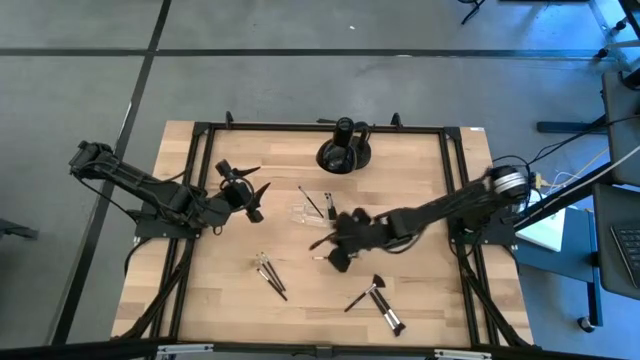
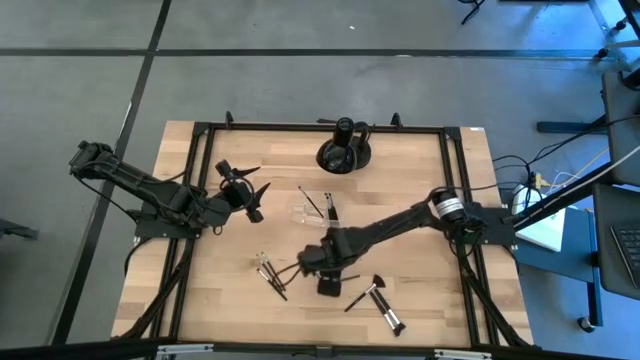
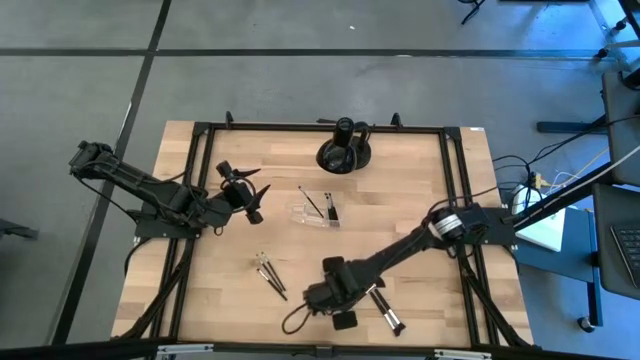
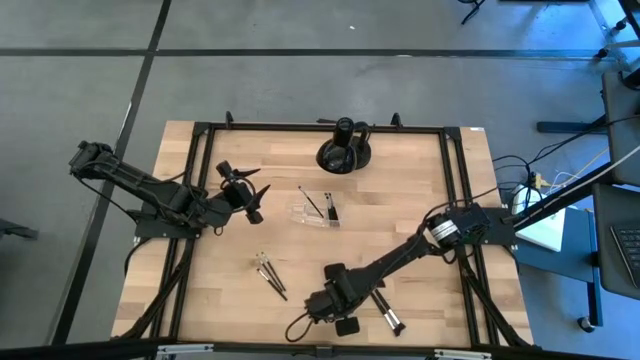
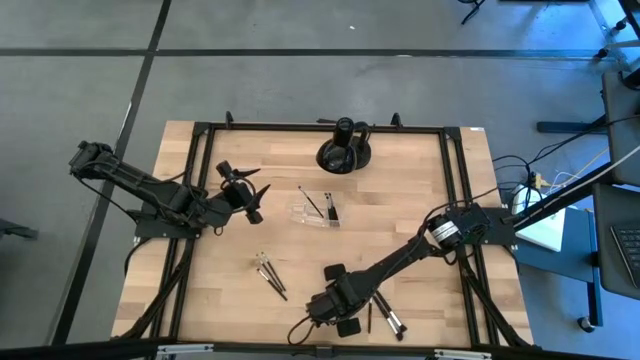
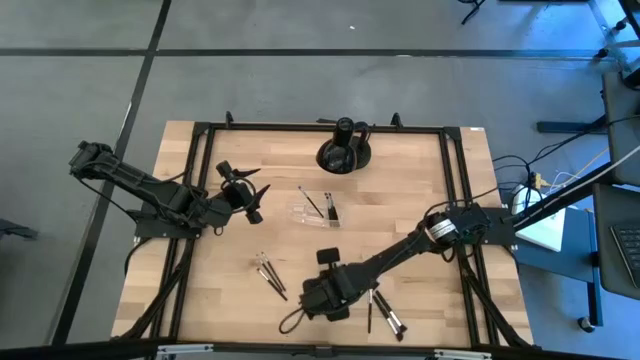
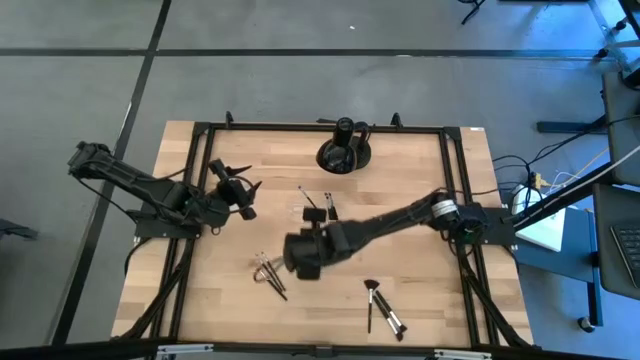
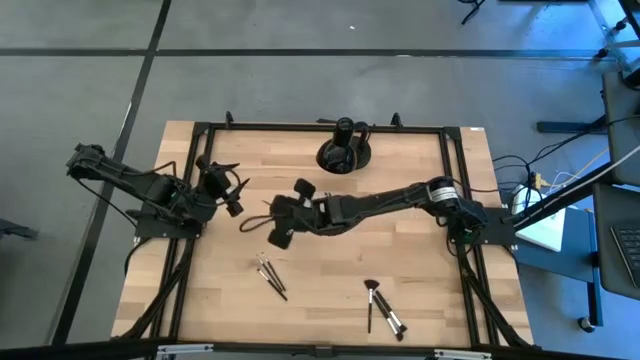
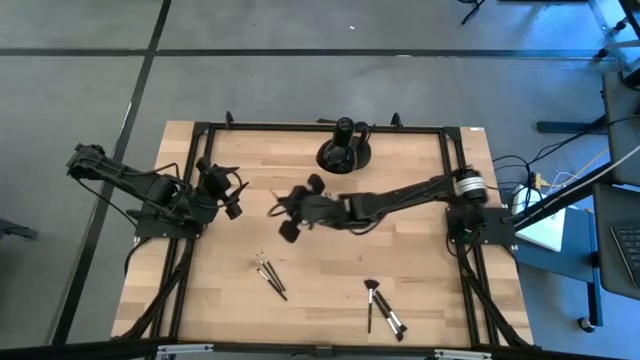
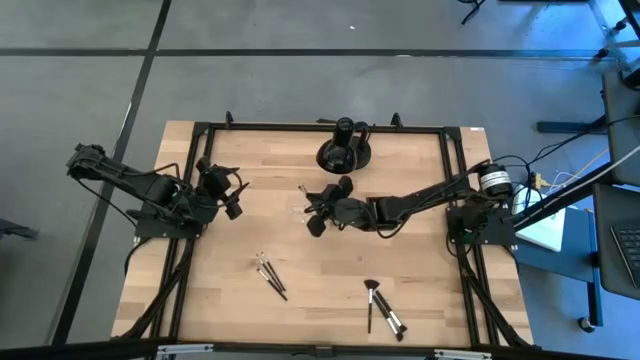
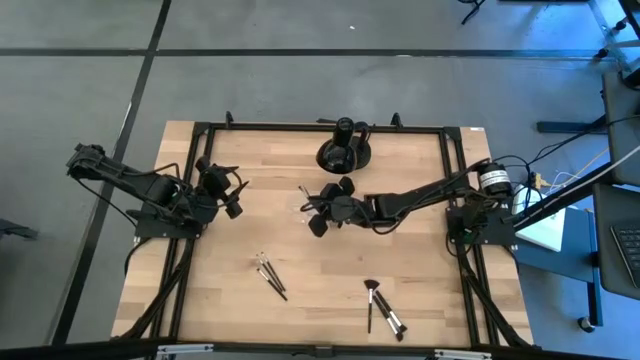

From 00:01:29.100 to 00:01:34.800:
Task: Pick & Place Makeup Supplies
Put the makeup brush into the transparent organizer

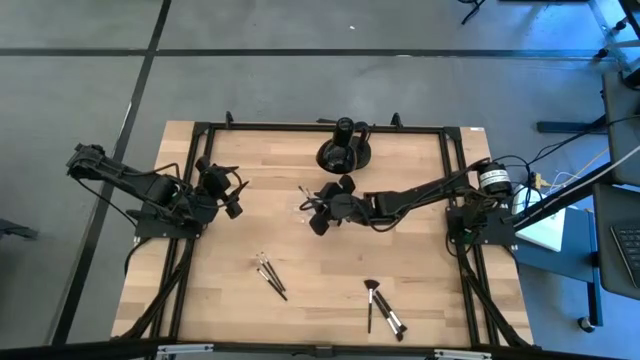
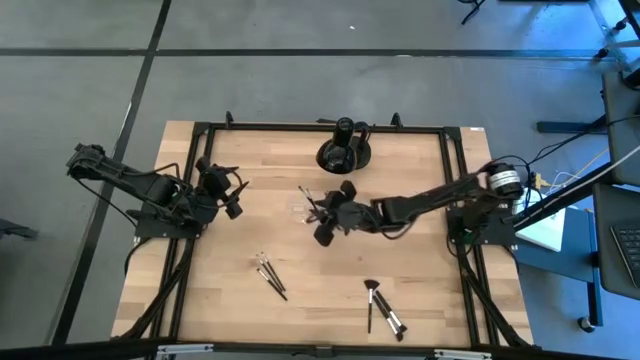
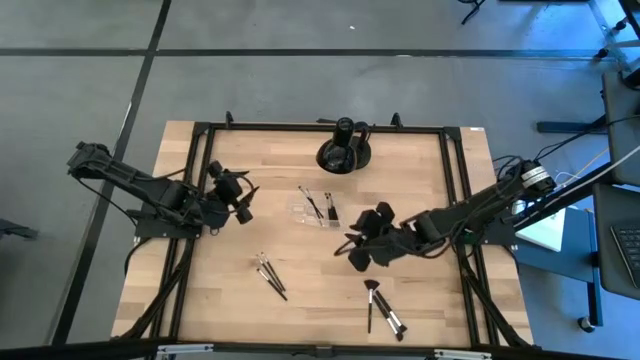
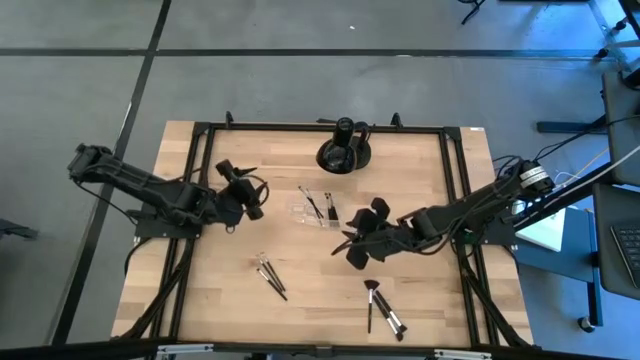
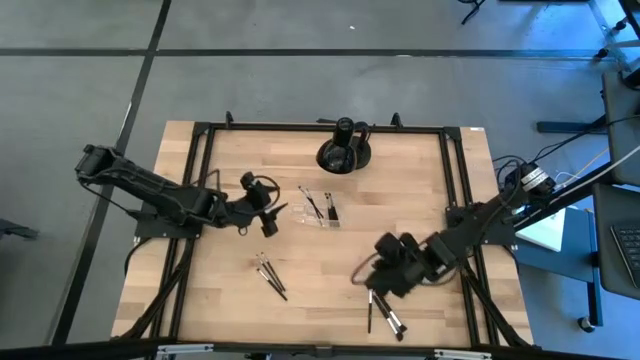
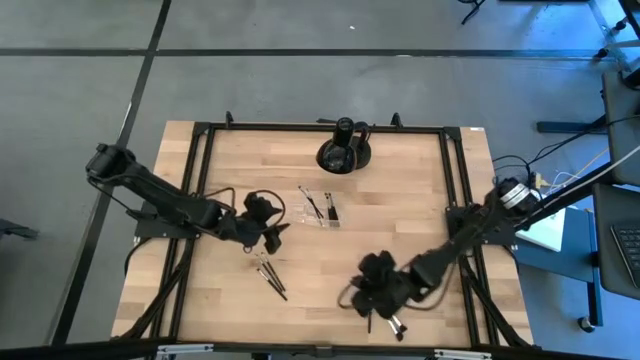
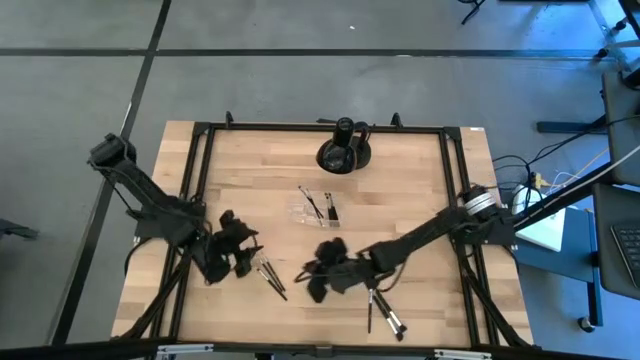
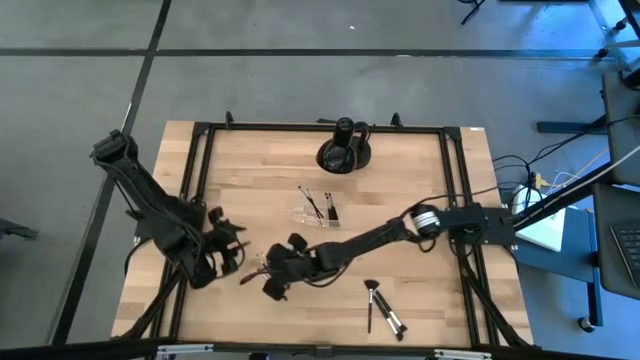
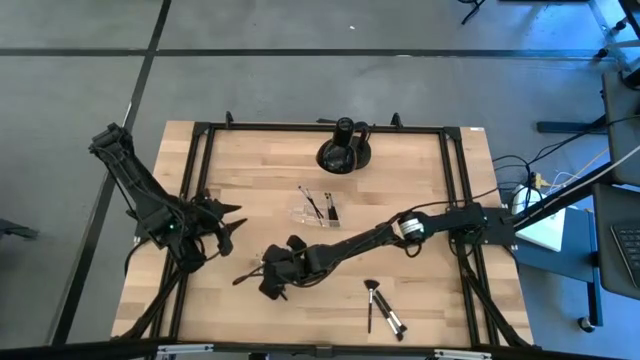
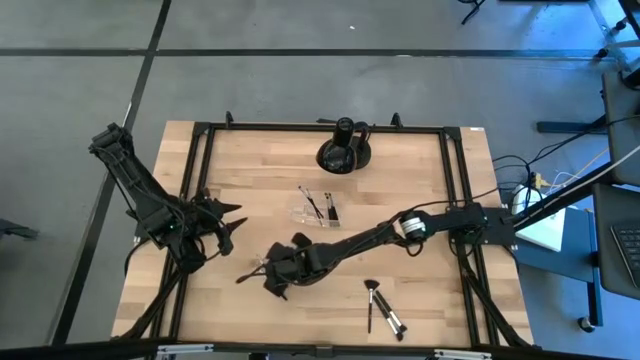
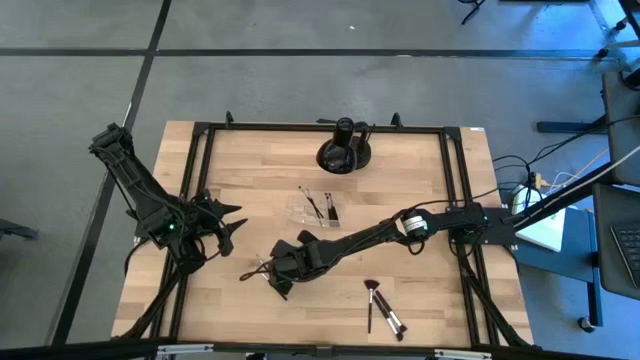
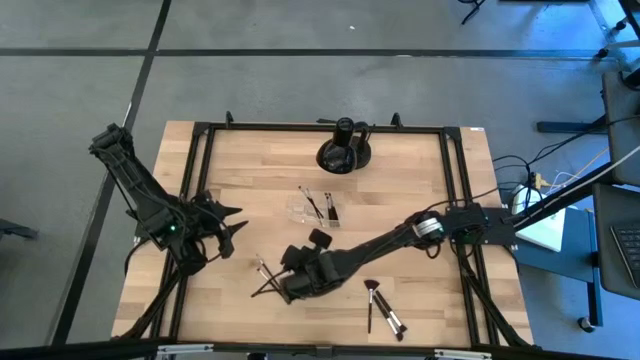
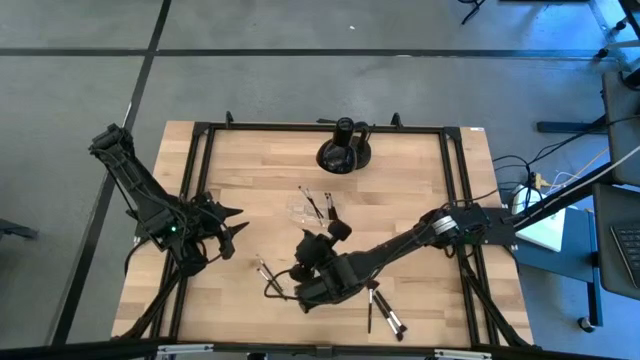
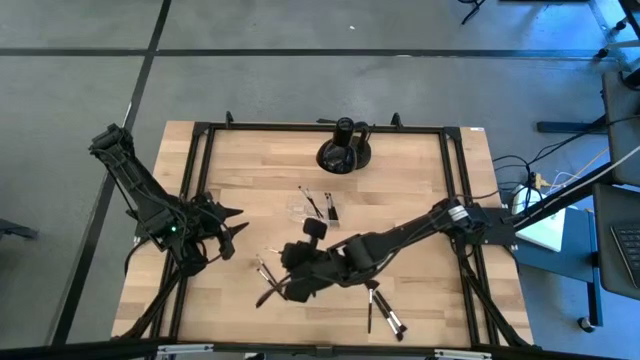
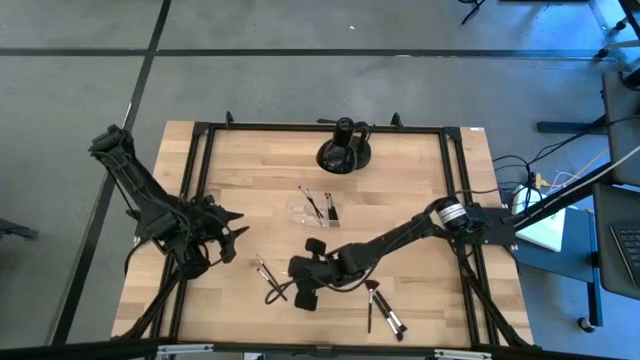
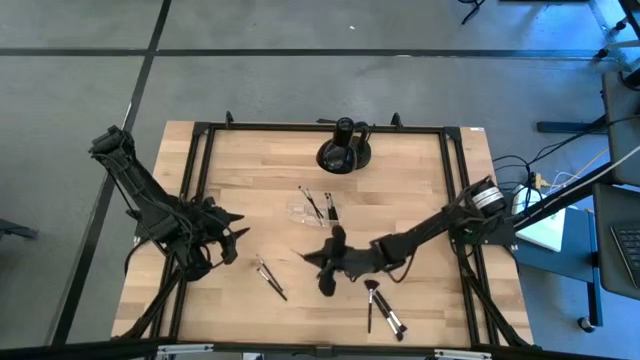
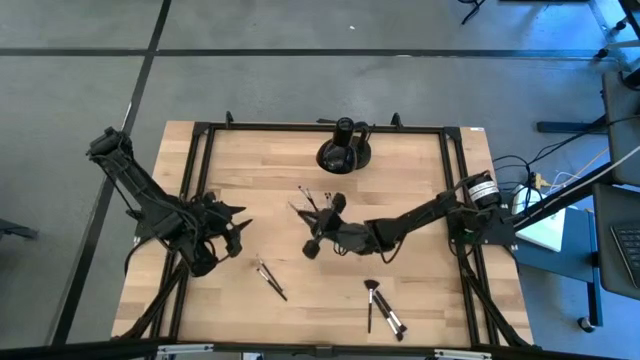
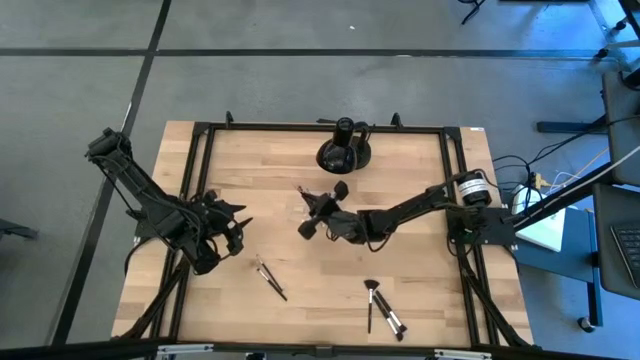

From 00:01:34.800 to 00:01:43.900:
Put the makeup brush into the transparent organizer

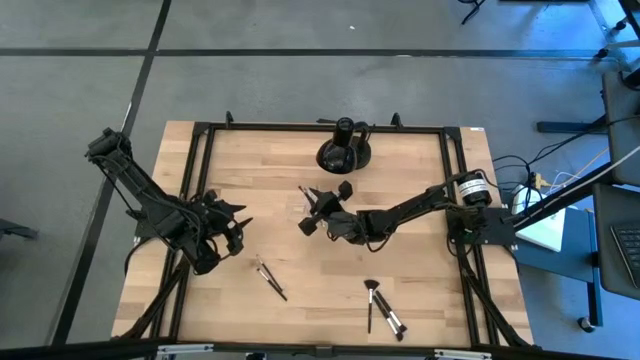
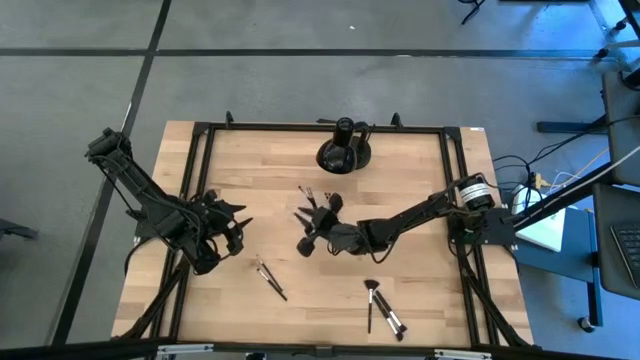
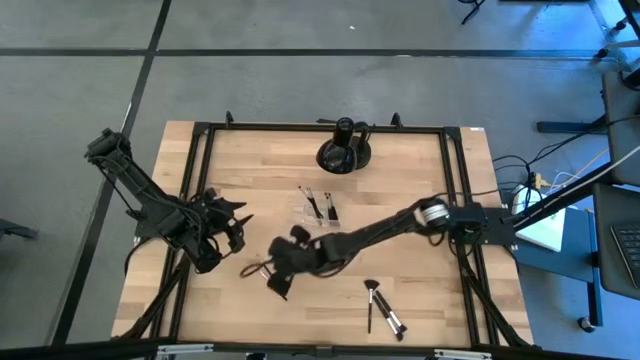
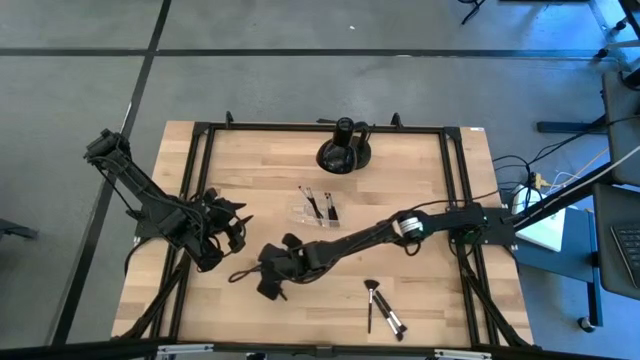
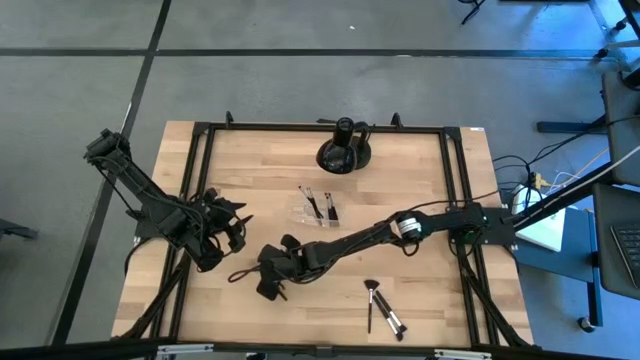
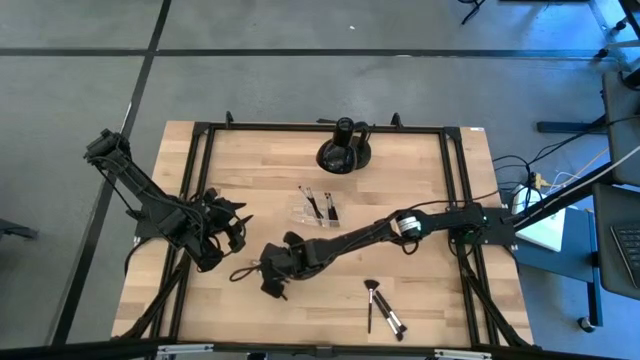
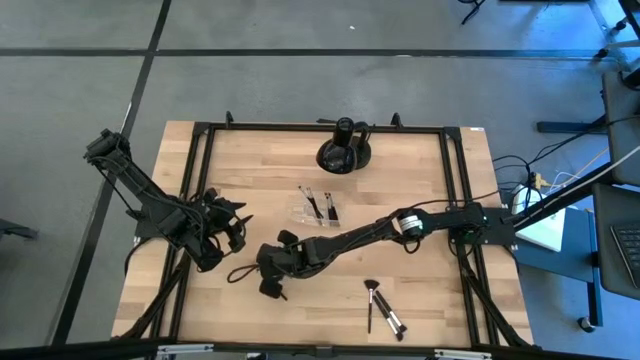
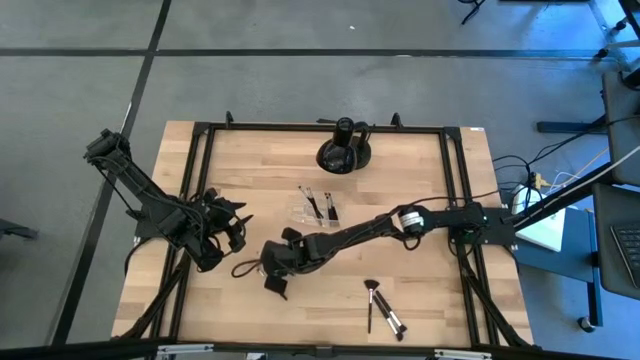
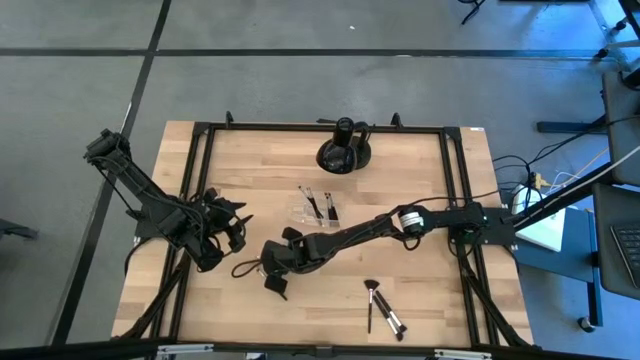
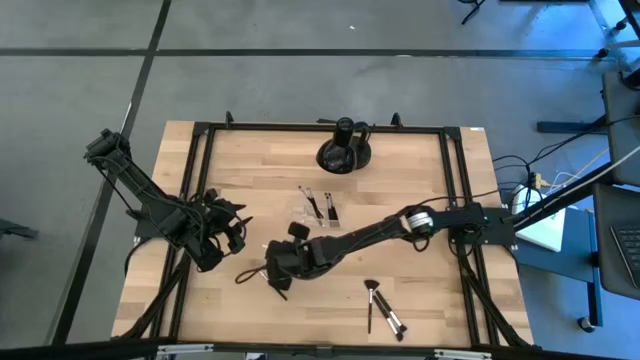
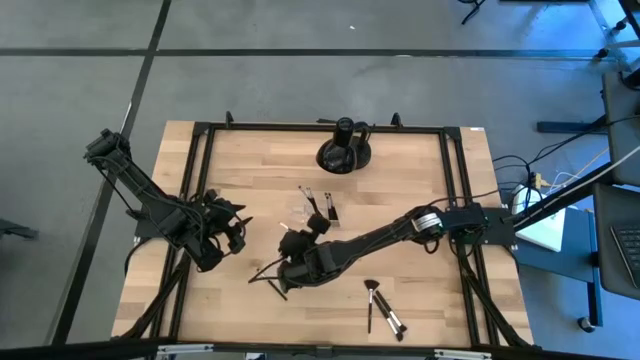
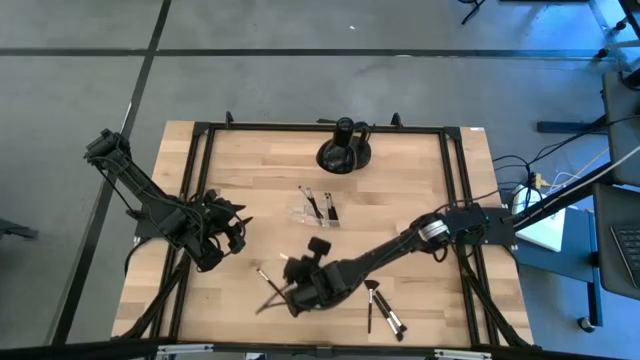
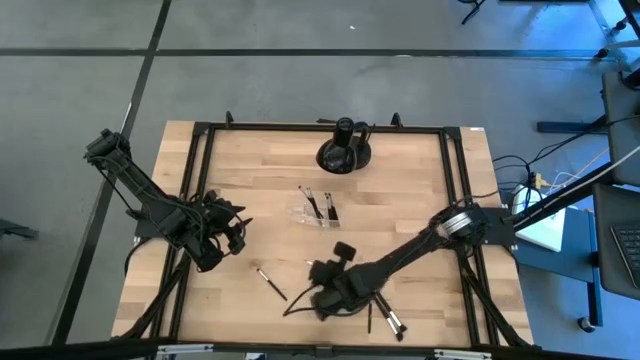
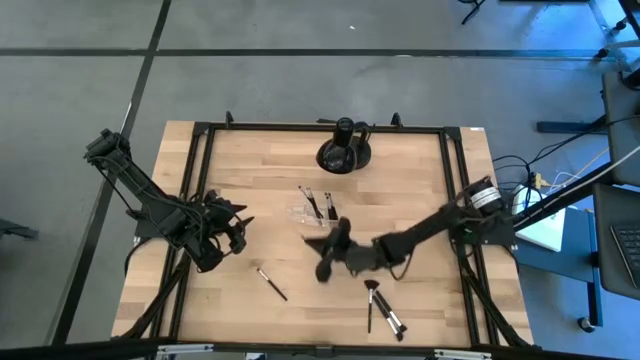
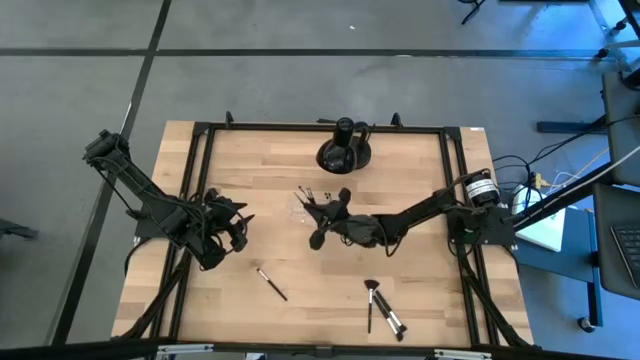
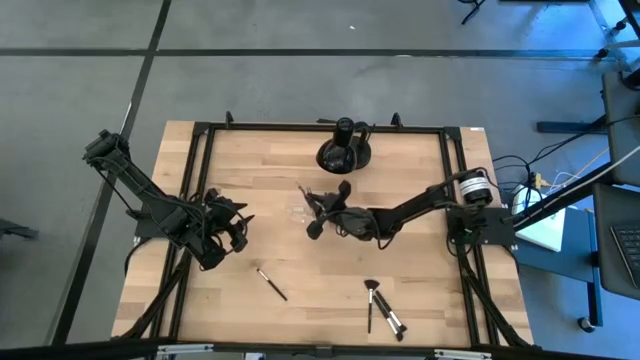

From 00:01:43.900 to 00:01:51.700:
Put the makeup brush into the transparent organizer

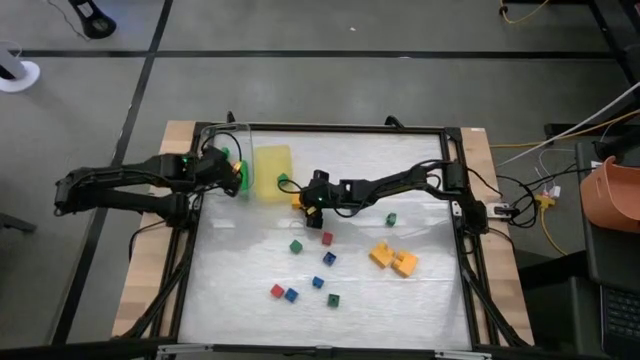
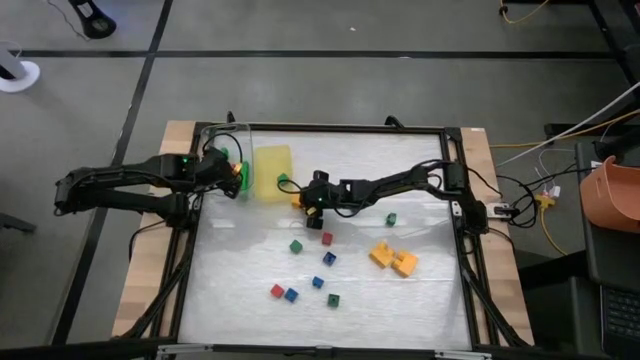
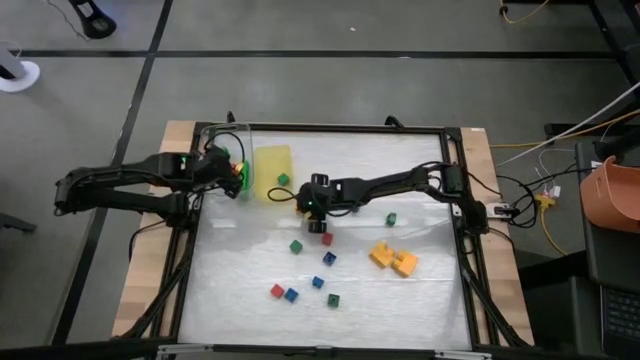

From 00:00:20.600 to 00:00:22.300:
Task: Sort blocks by size
Put the large yellow game piece into the transparent bin
